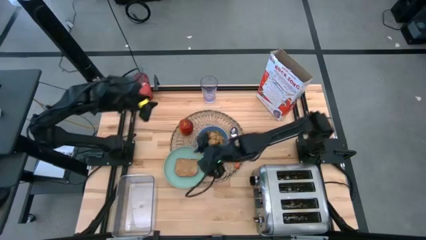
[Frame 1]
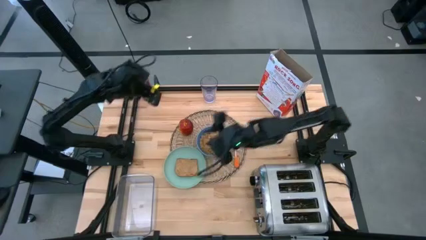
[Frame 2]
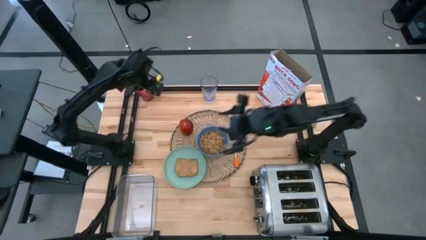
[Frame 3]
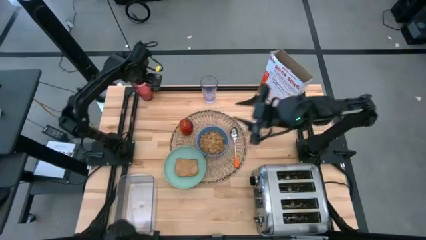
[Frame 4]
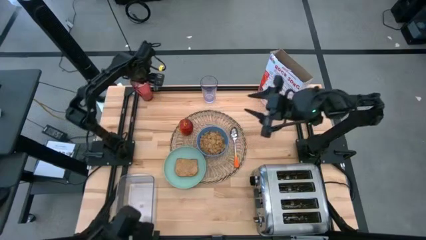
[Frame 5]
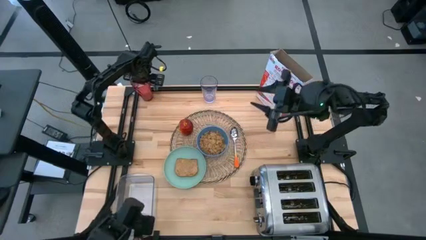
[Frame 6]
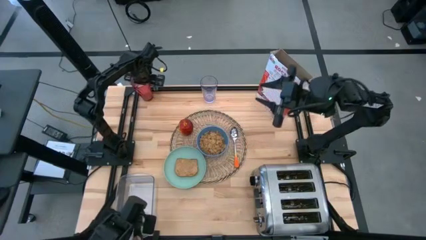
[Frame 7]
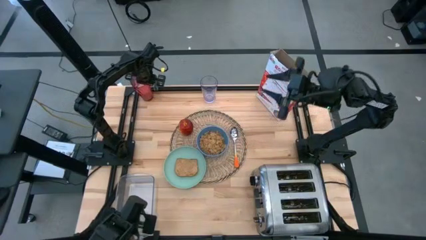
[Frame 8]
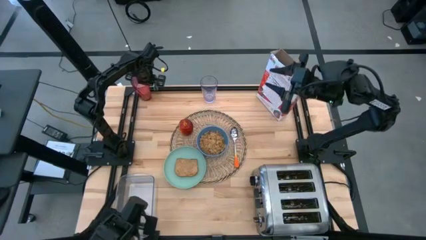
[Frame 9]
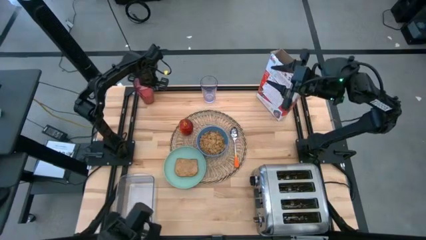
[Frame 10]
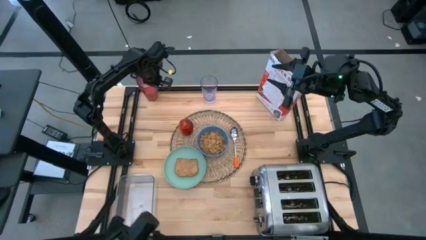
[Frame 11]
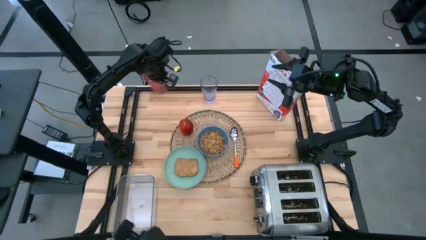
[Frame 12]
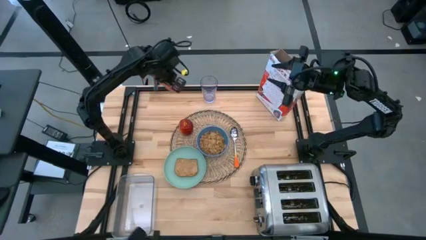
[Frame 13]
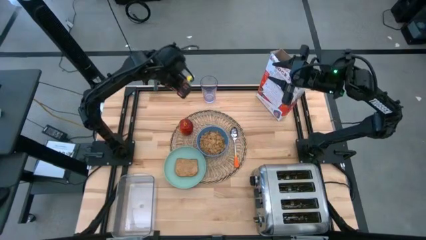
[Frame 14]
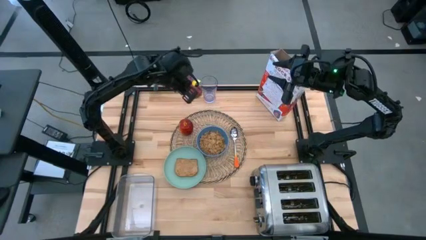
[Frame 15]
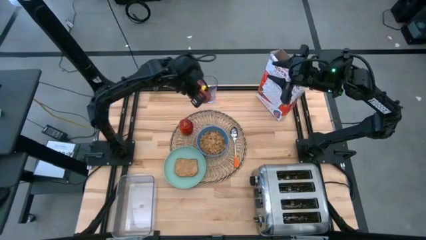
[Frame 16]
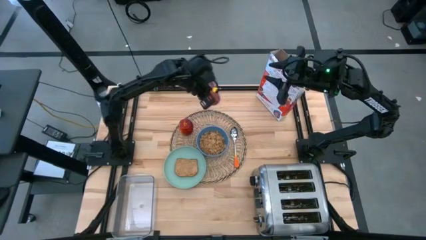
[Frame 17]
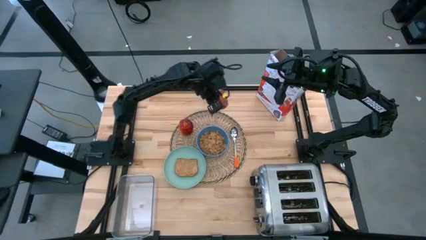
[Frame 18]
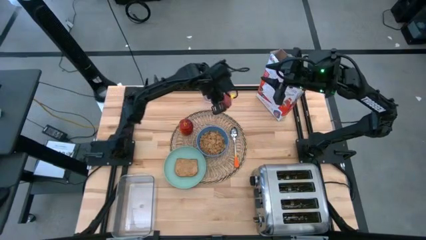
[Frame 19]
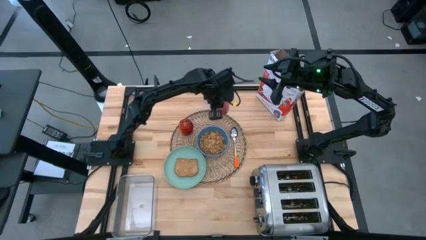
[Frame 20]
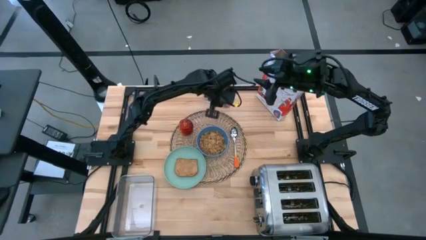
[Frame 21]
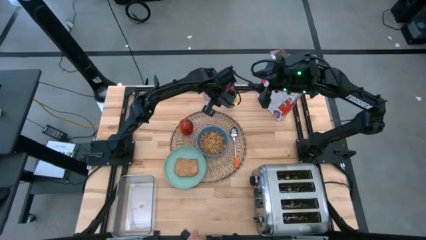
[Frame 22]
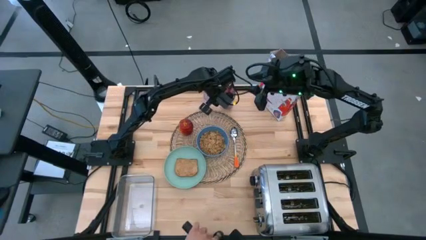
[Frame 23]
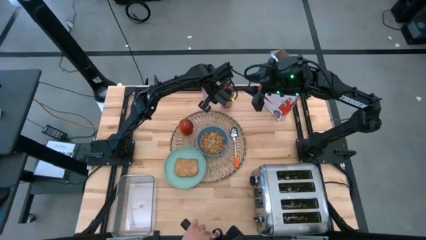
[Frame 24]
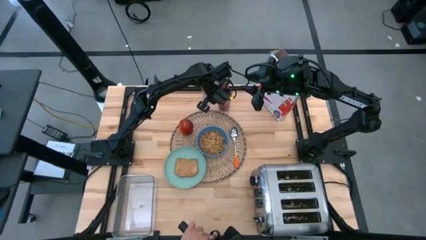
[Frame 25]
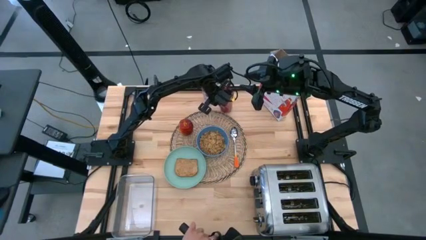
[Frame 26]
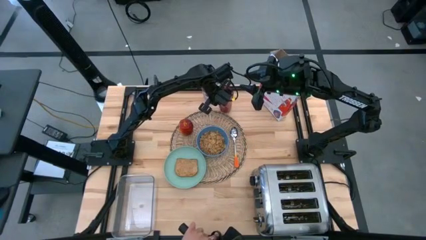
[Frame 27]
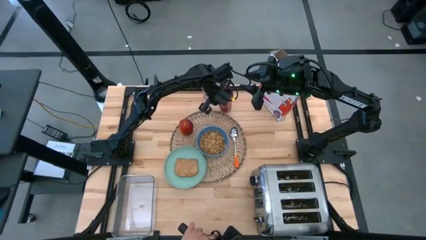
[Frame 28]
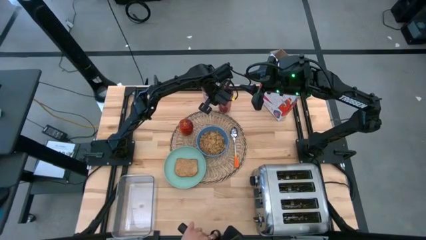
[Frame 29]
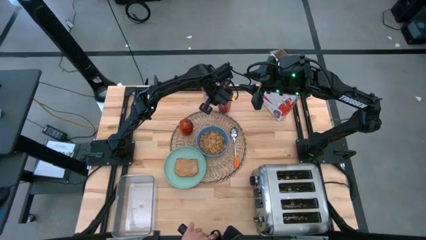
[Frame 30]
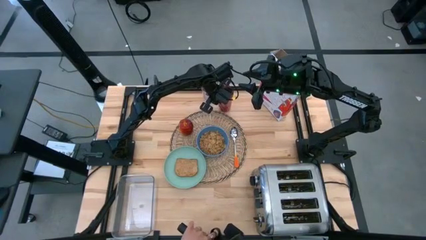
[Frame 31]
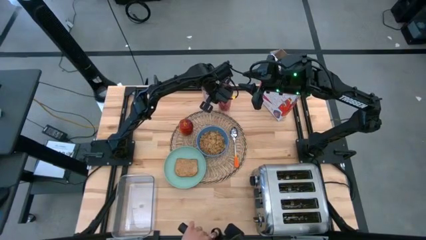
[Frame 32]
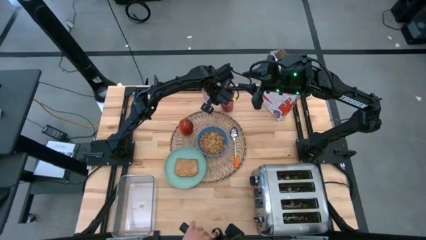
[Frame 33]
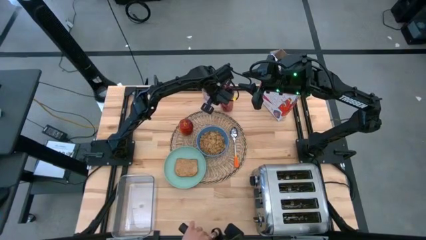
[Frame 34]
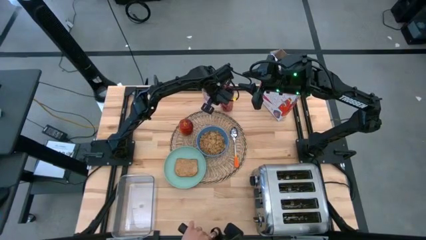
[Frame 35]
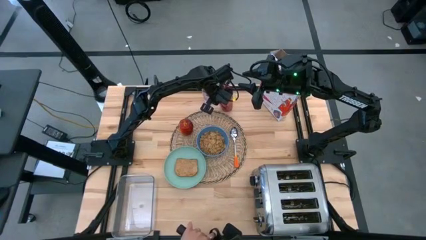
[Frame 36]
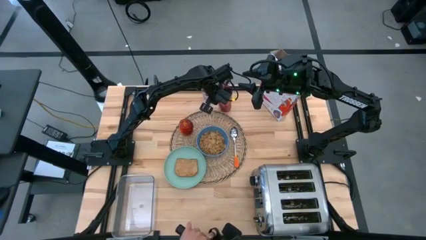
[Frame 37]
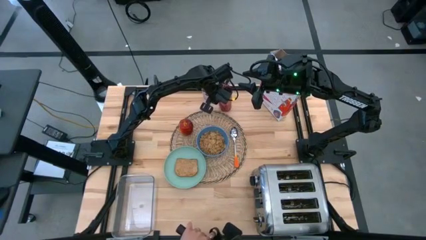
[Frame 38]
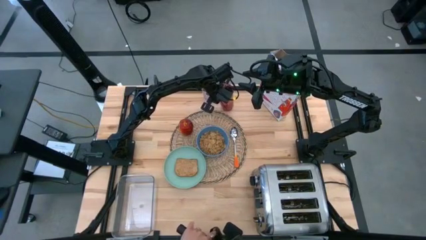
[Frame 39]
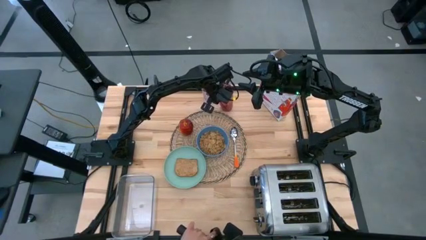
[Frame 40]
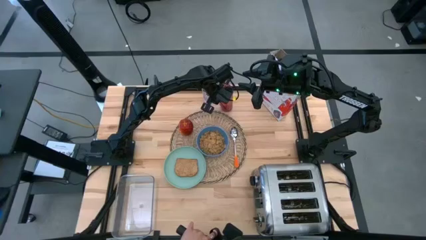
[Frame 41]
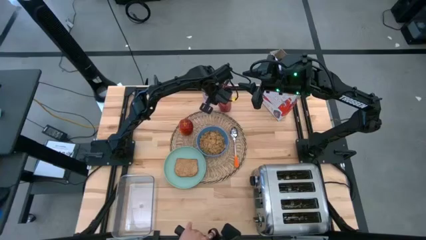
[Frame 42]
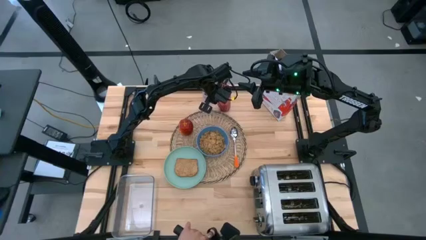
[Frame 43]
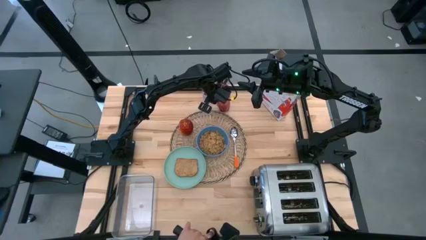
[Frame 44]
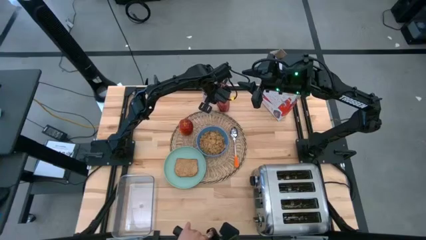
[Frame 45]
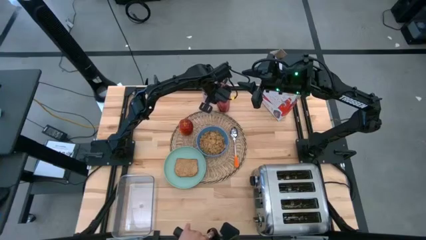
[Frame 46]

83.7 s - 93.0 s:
Task: Arrange a breakfast setting
Move the red cup to the top center of the table

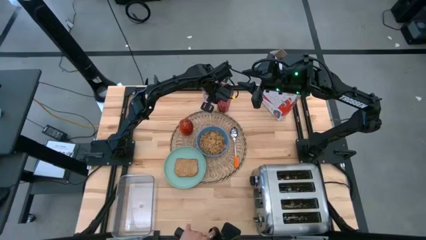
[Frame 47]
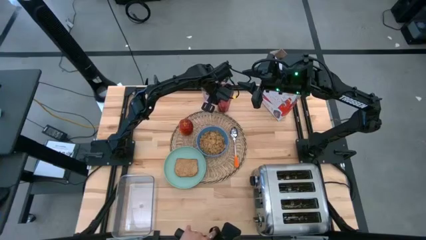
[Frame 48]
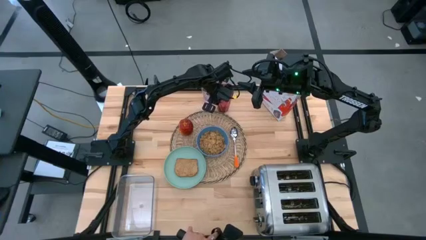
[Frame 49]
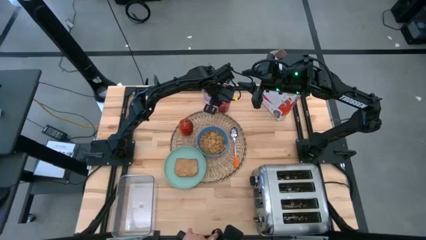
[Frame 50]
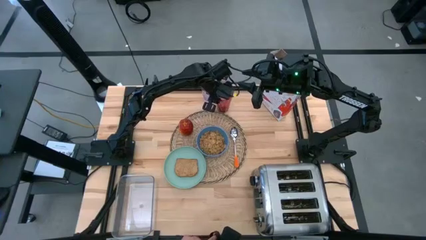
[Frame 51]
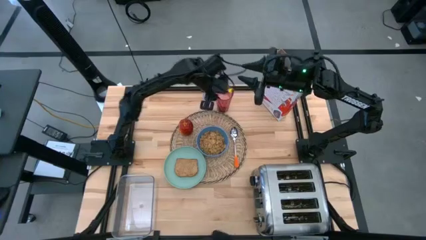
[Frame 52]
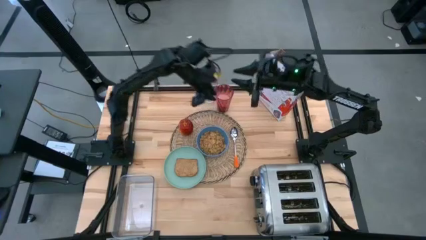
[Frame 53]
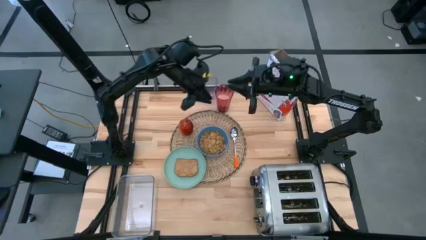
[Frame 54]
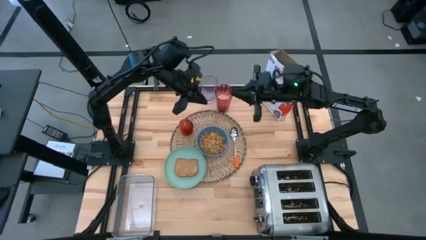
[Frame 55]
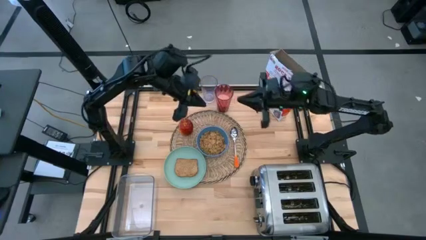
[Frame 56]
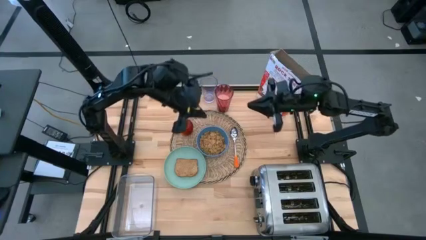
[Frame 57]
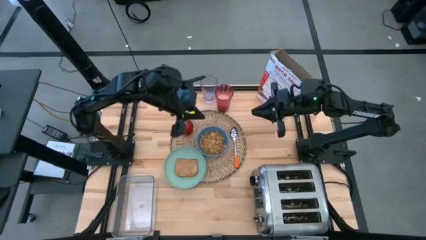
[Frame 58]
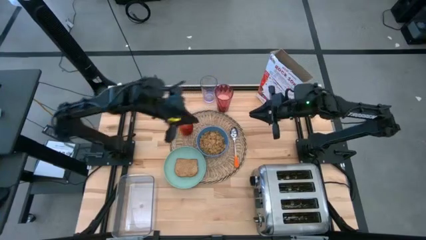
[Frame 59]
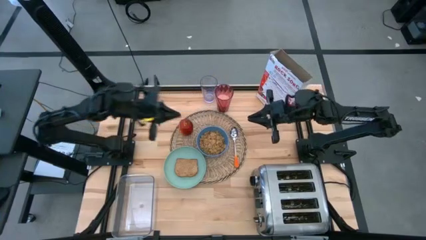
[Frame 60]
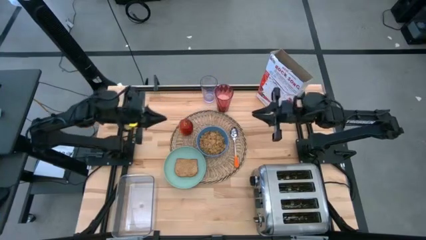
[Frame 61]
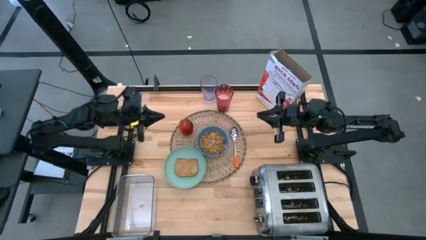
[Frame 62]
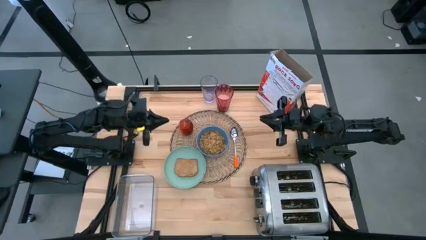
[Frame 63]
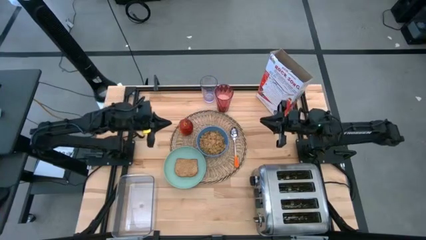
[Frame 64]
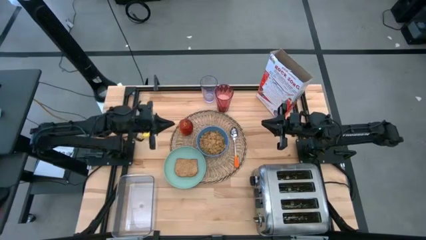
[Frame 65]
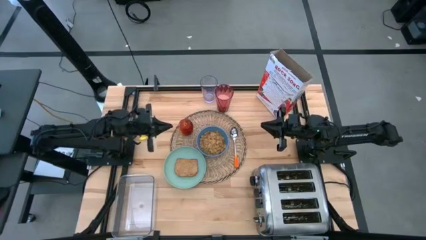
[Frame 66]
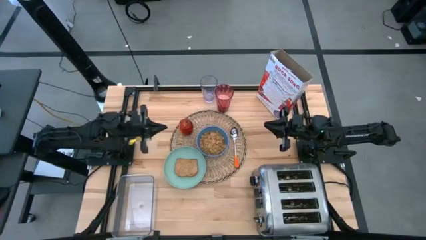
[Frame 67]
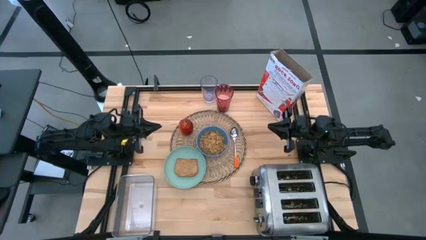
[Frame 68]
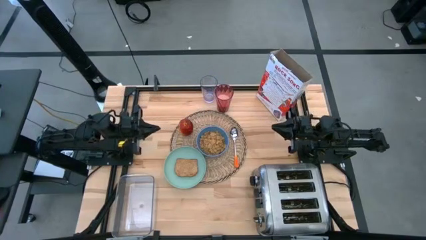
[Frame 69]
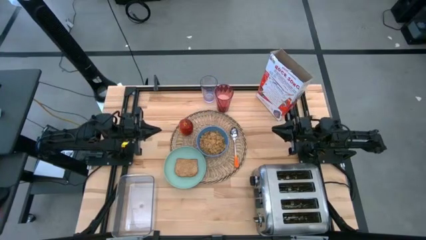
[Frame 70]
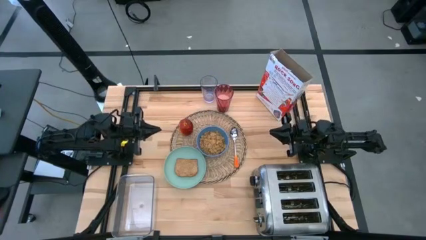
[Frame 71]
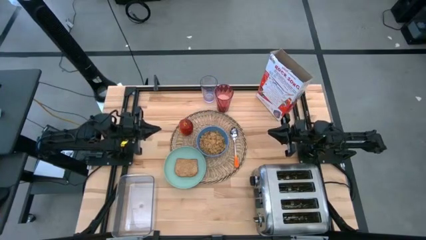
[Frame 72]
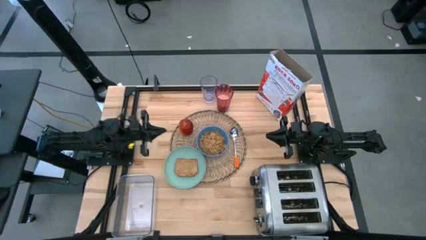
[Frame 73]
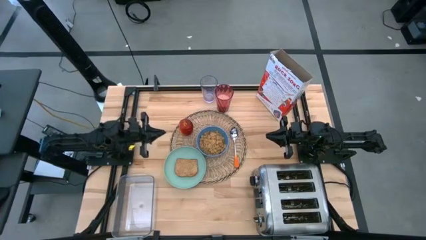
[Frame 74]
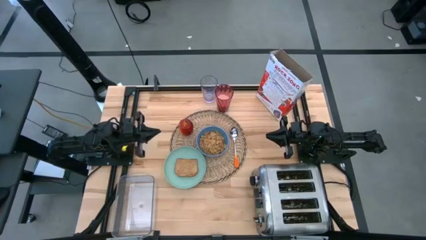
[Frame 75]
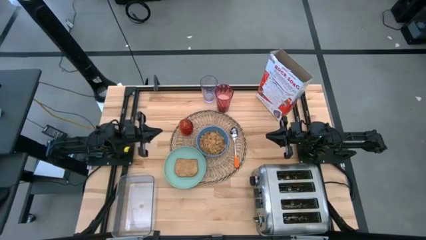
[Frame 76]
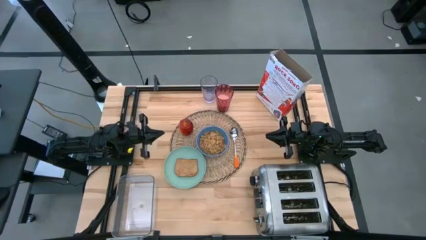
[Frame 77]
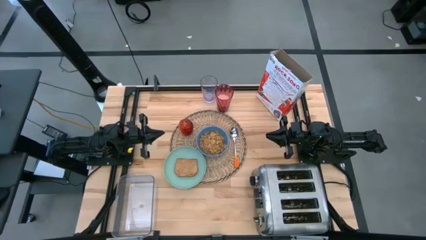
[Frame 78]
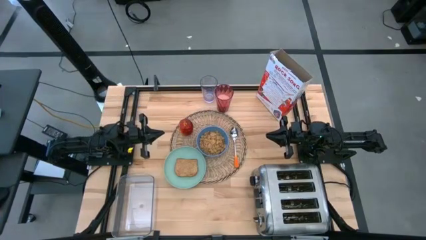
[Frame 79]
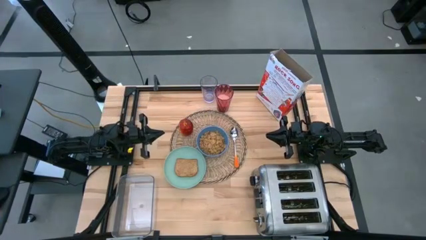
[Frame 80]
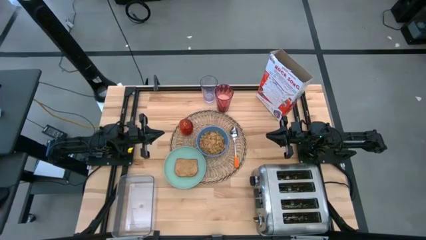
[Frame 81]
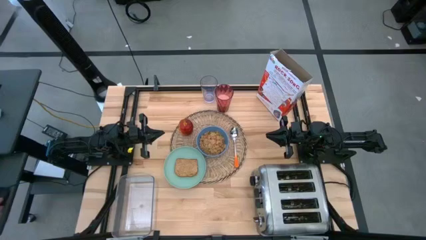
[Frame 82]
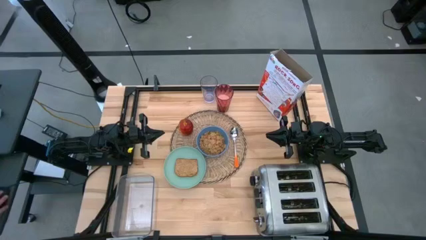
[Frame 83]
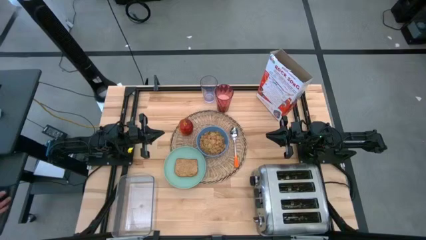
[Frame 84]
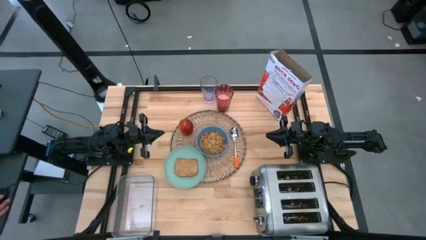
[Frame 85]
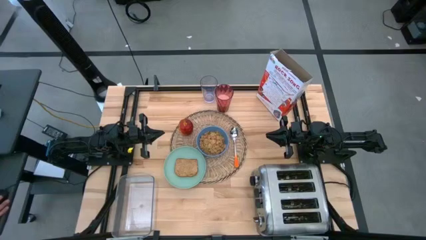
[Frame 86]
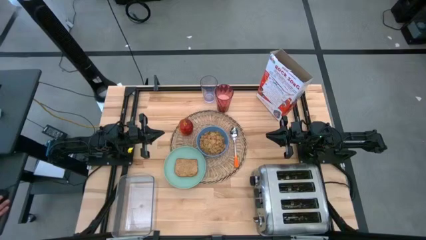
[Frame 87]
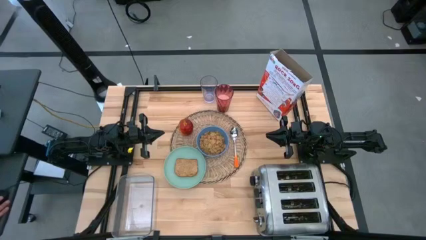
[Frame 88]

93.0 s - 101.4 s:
Return to Home Position
